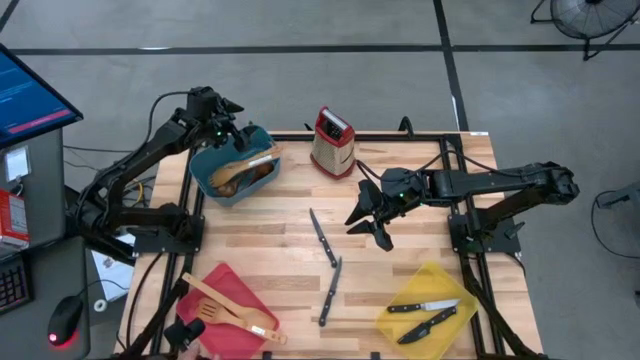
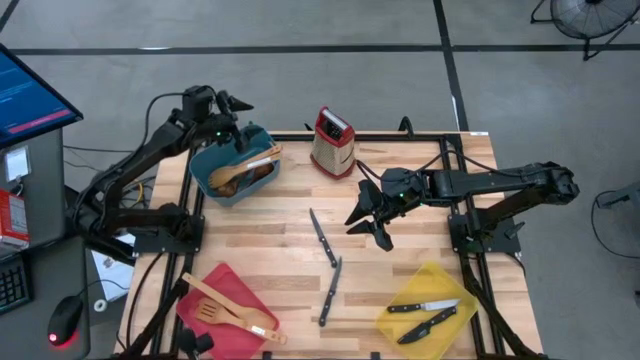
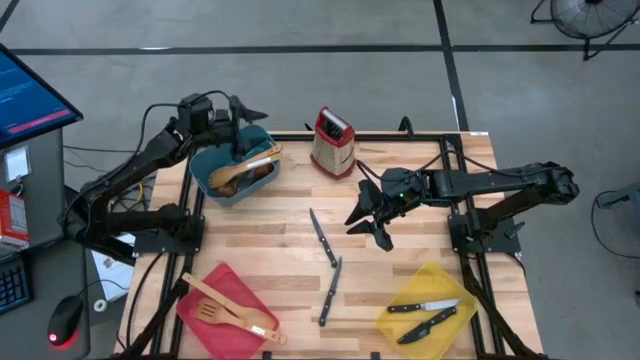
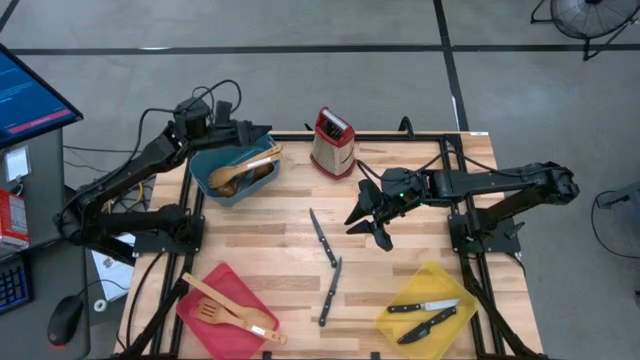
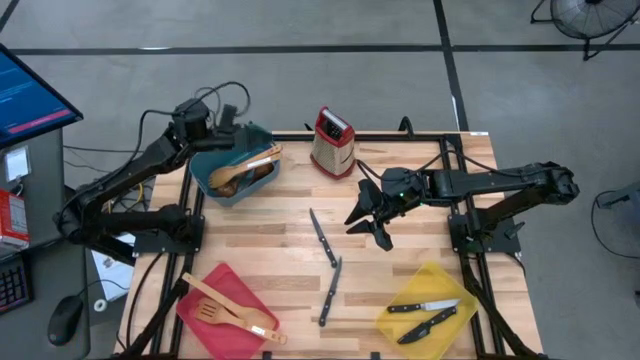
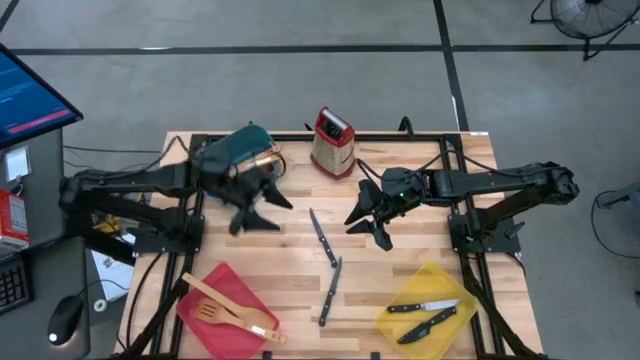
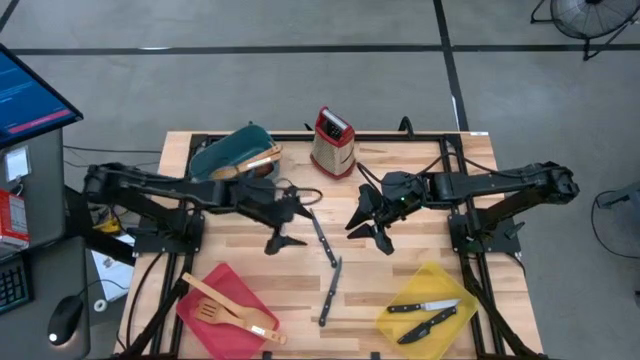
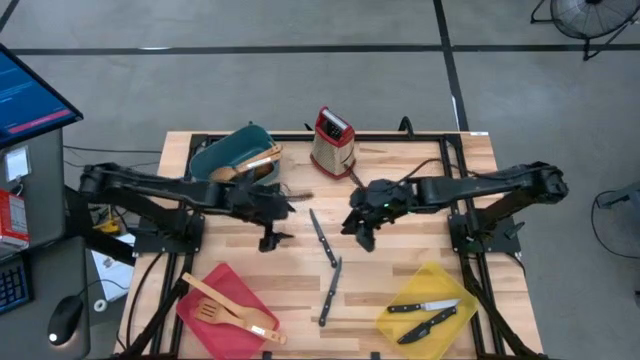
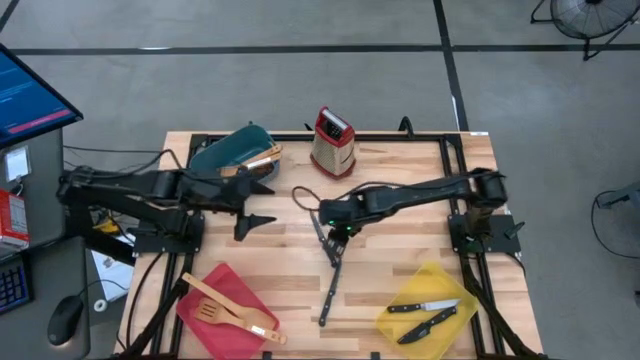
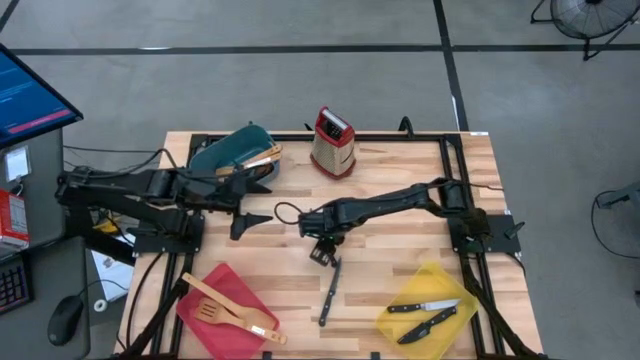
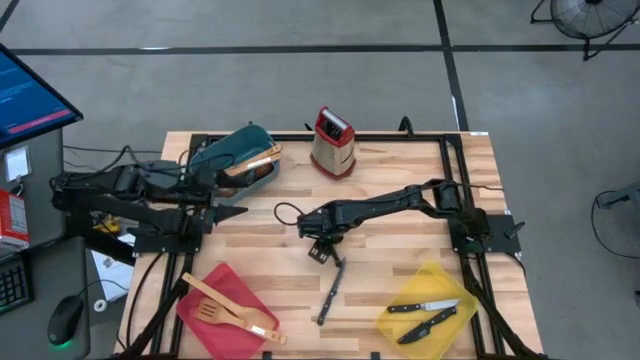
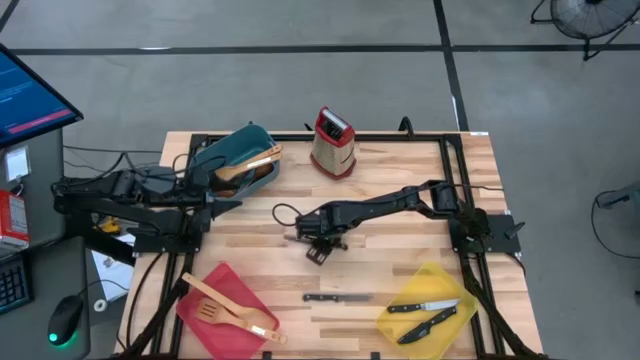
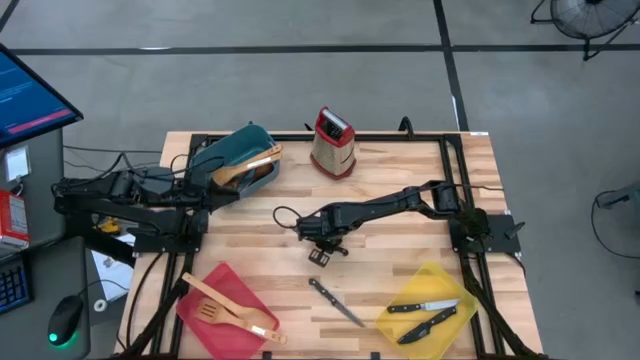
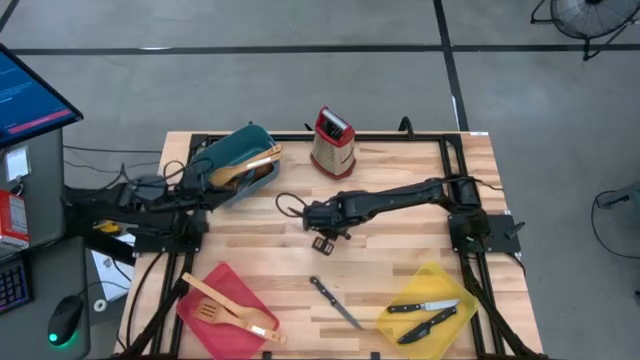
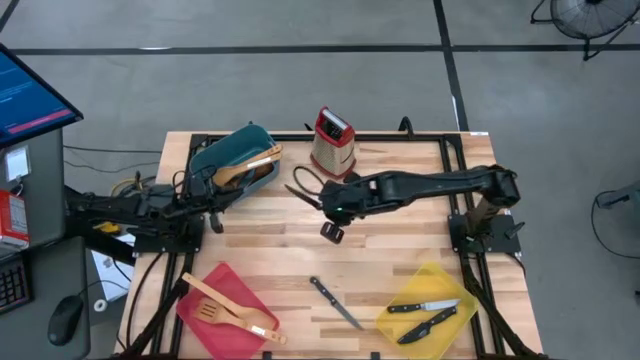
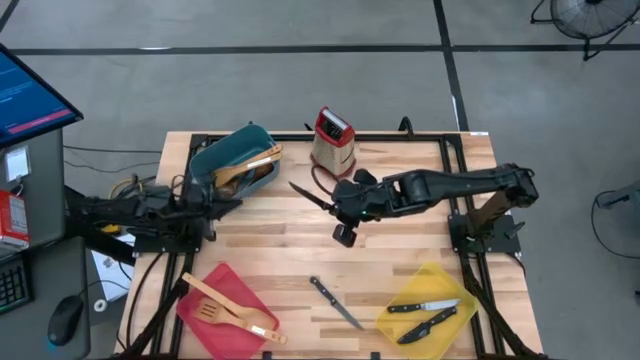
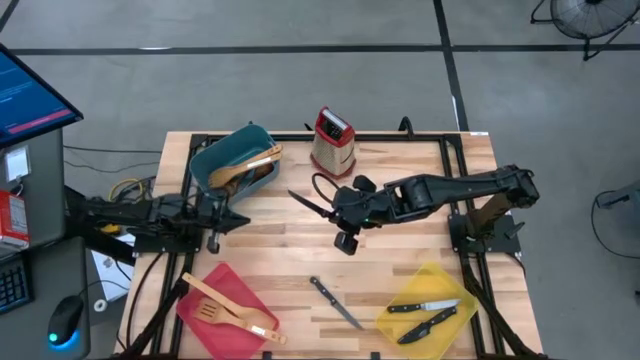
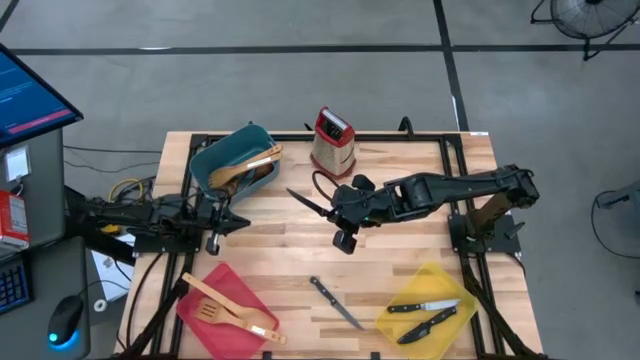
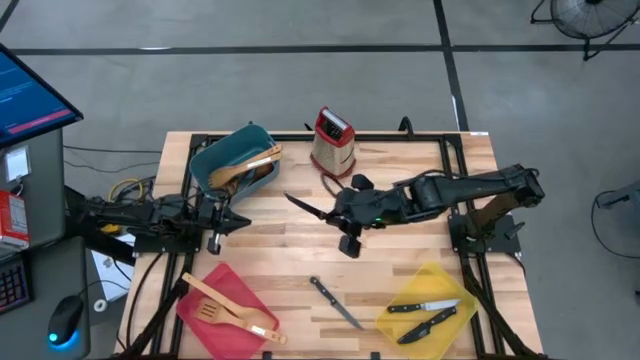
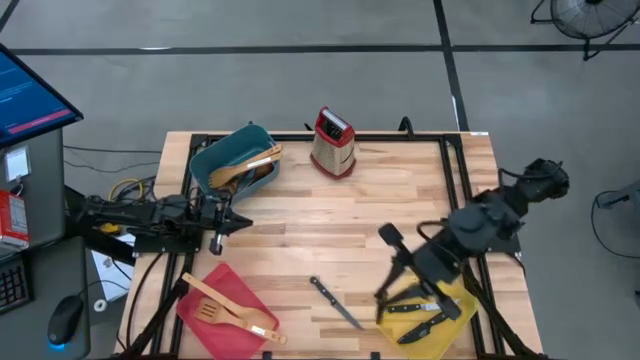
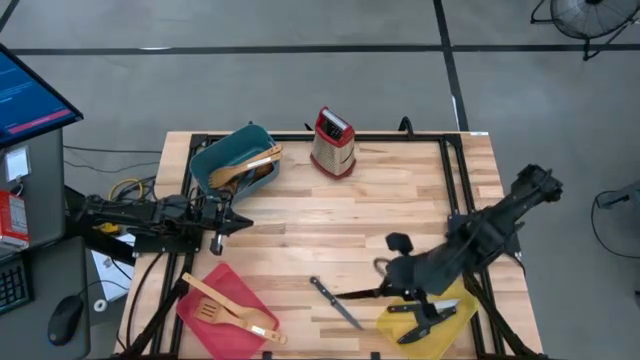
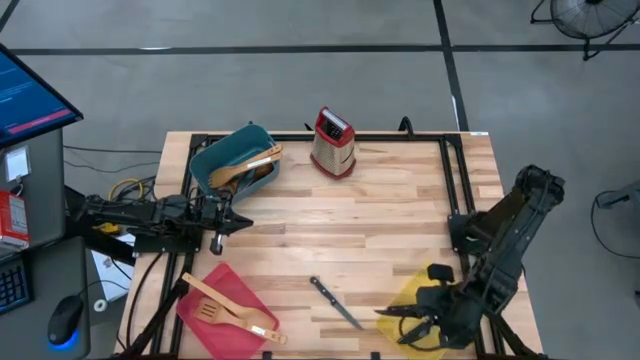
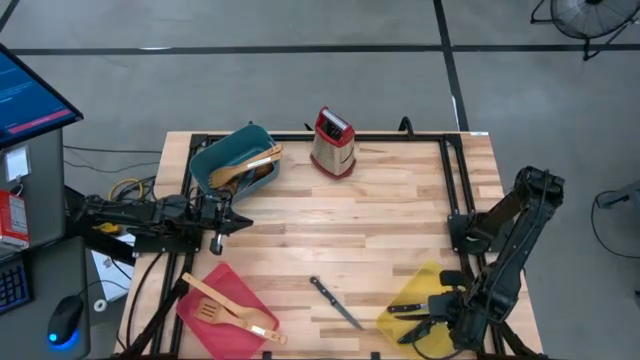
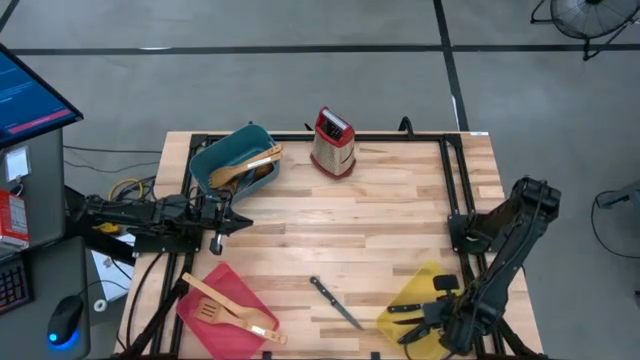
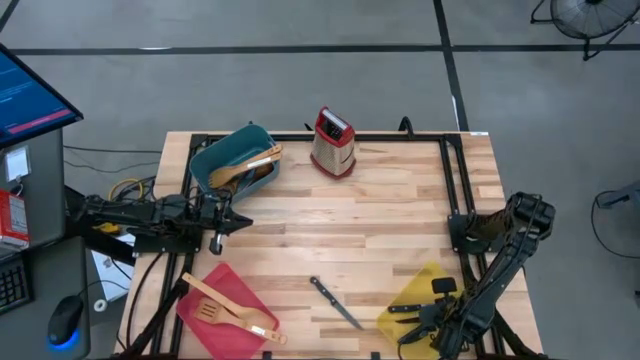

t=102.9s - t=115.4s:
Task: Pick & Place Kitchen Items
Put the black table knife into the yellow bin

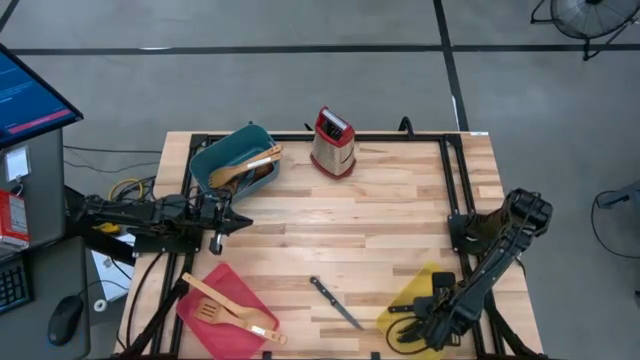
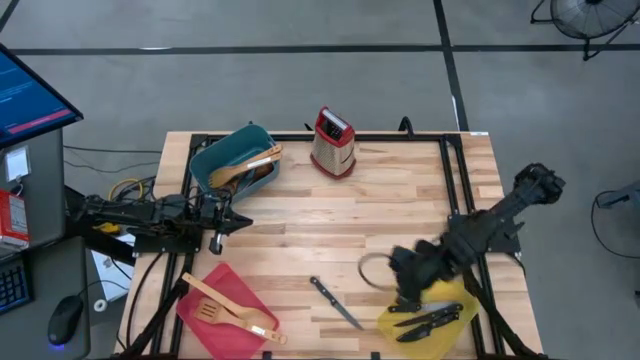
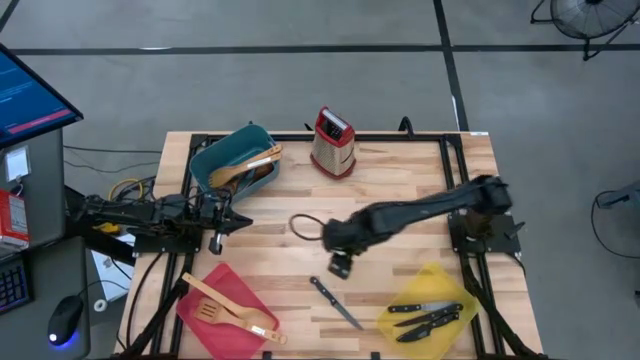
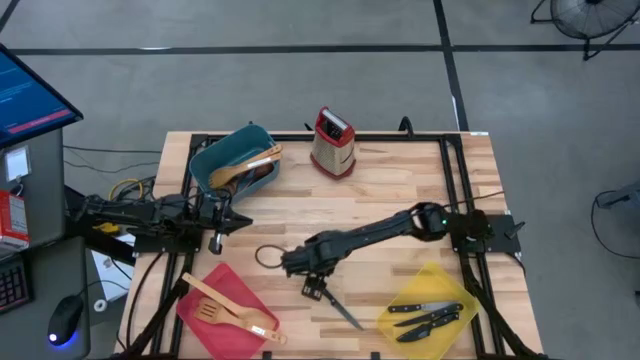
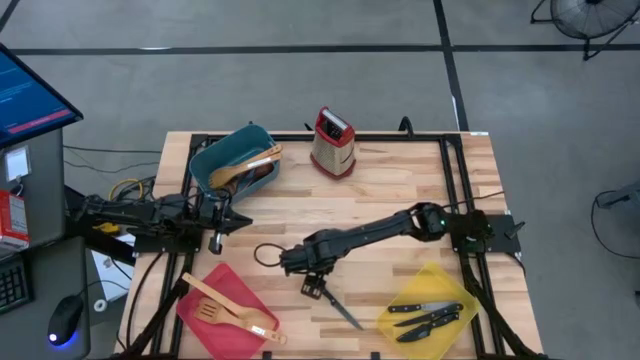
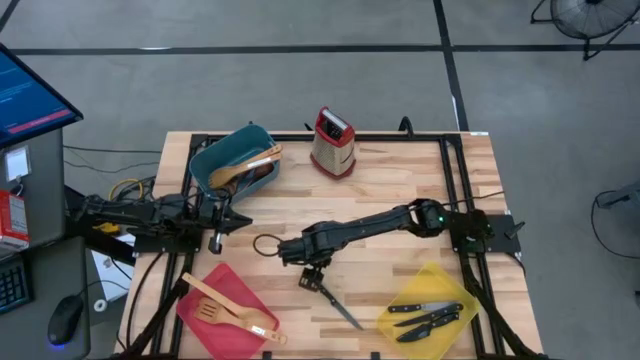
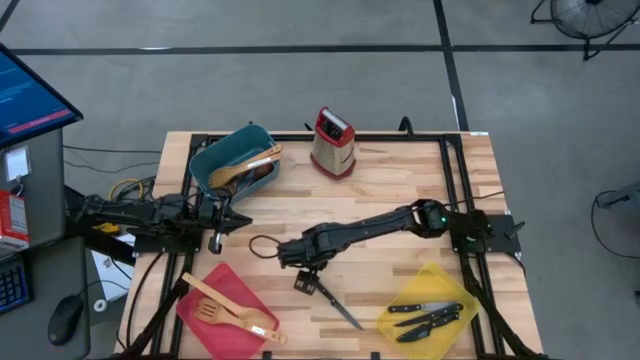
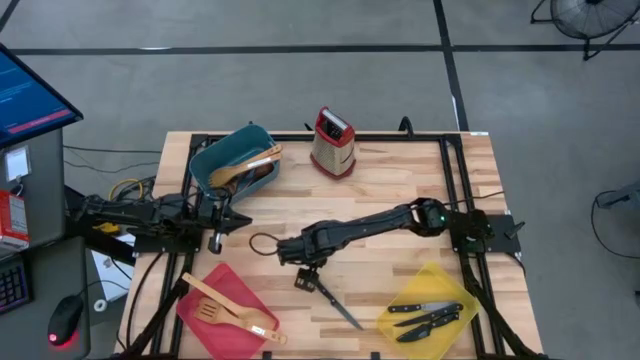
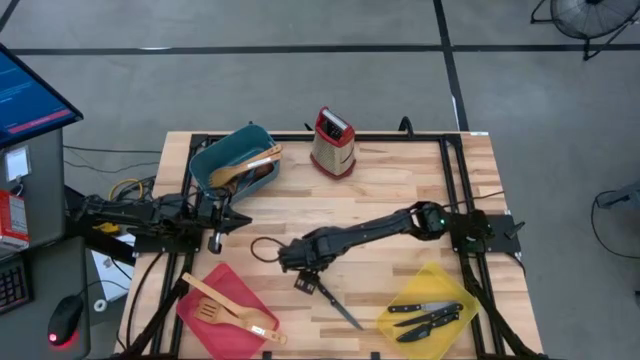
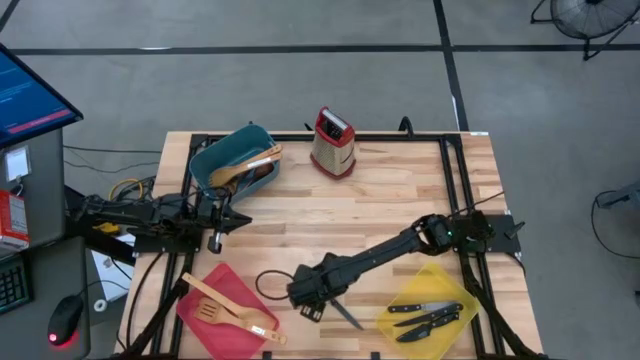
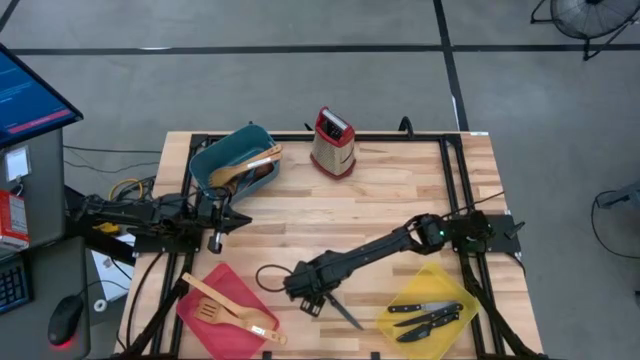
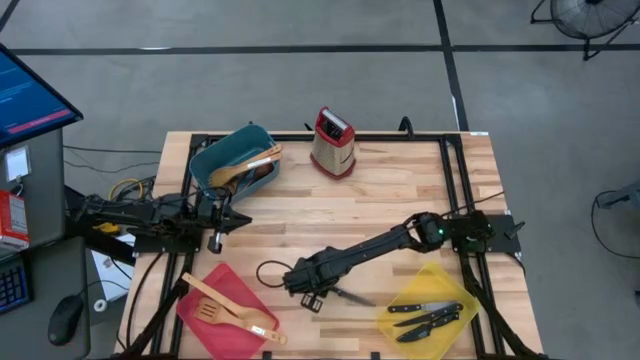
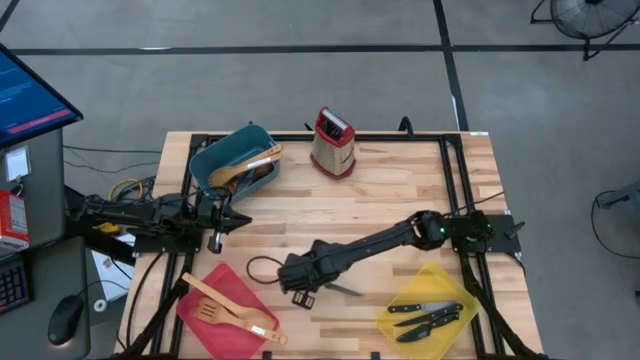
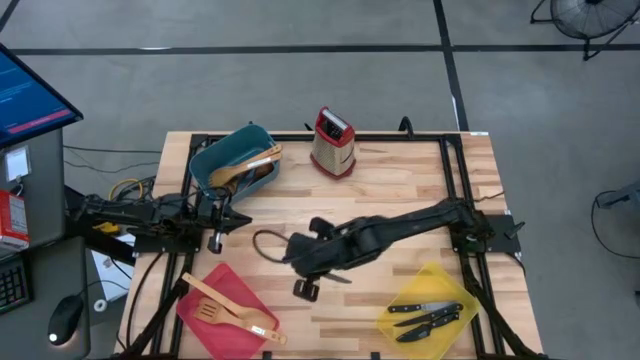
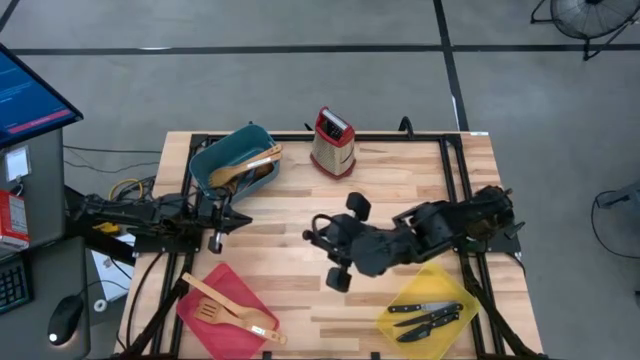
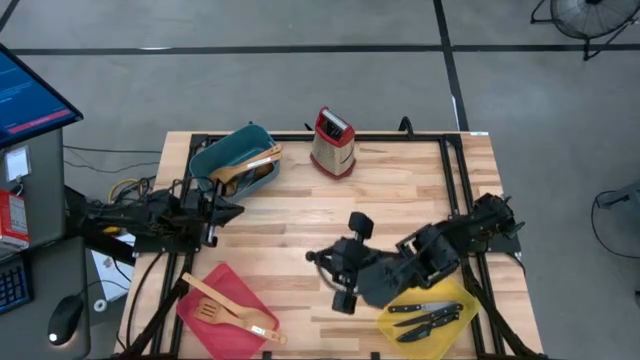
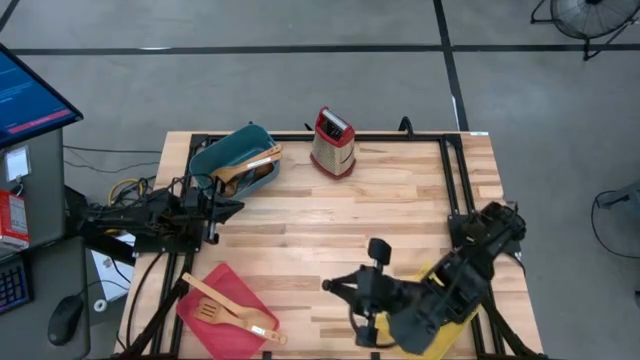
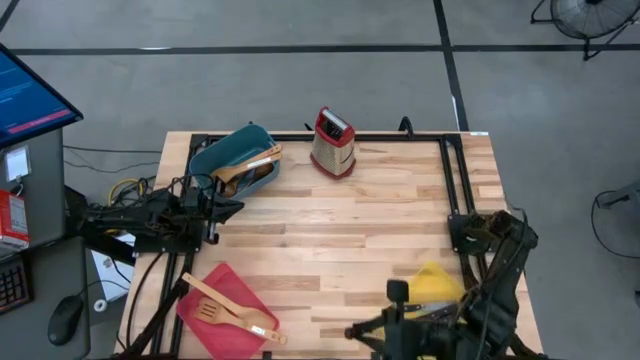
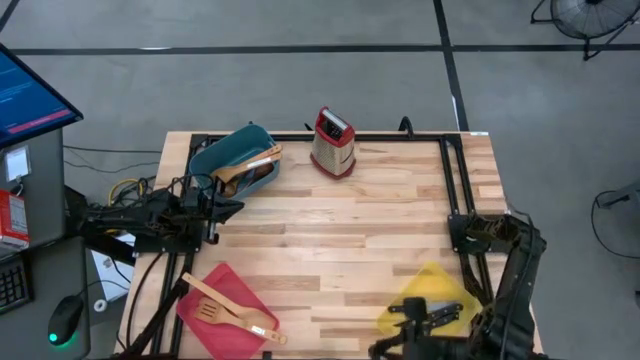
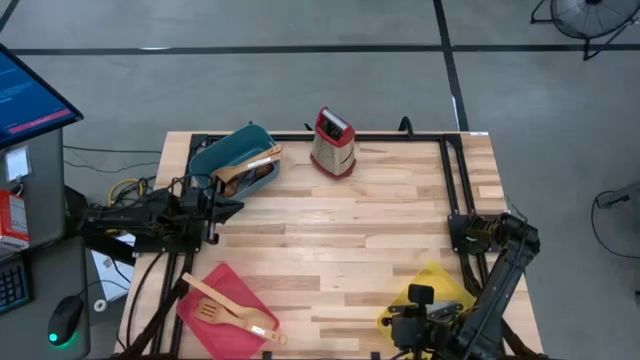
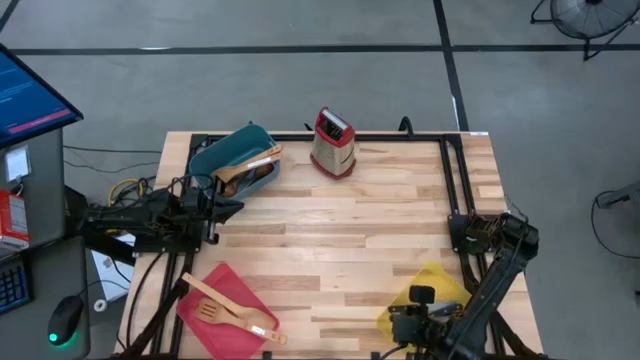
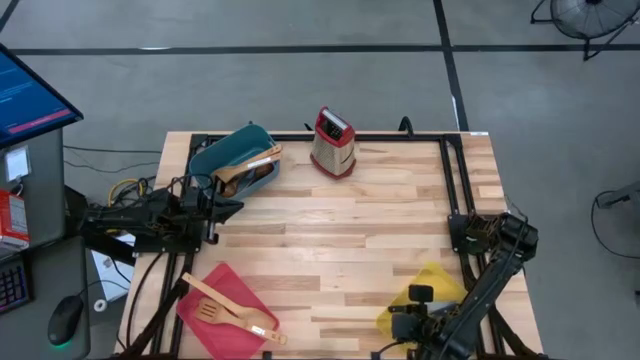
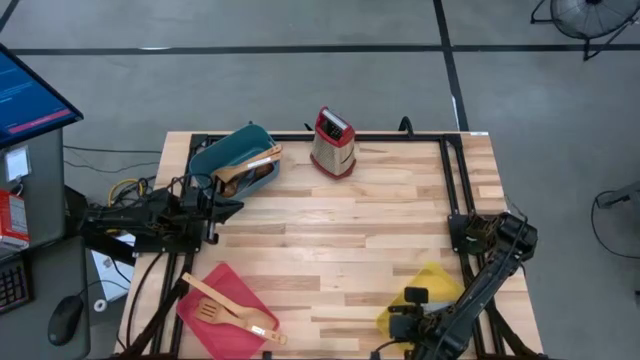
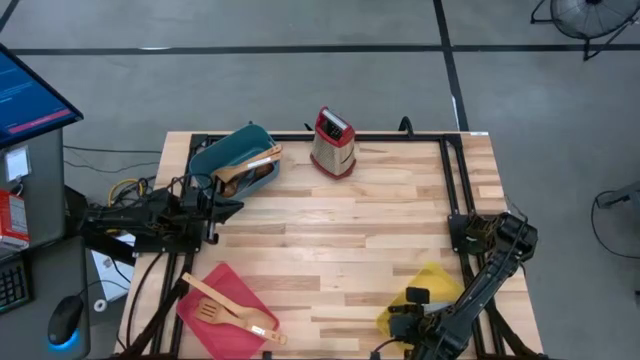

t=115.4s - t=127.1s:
Put the black table knife into the yellow bin
